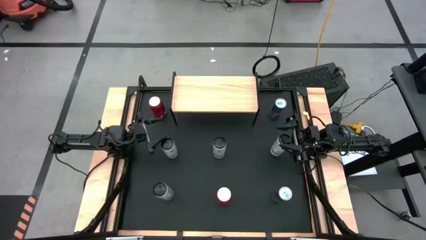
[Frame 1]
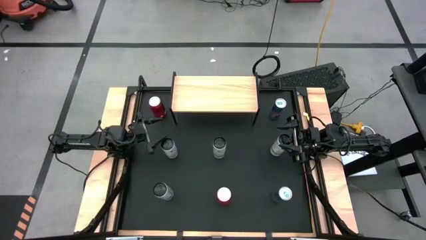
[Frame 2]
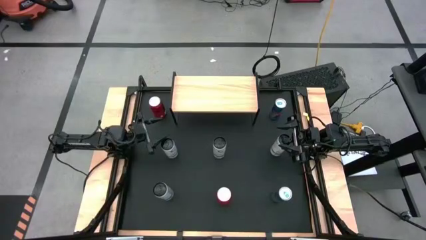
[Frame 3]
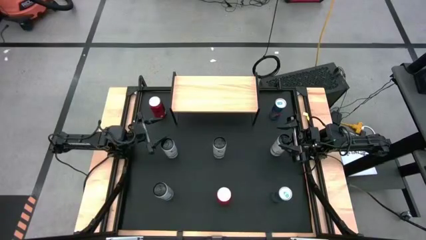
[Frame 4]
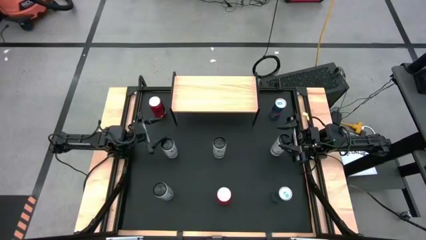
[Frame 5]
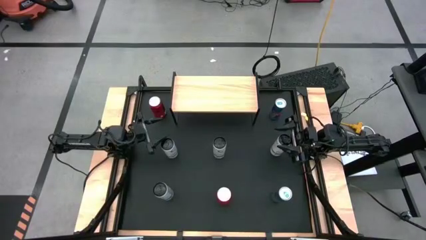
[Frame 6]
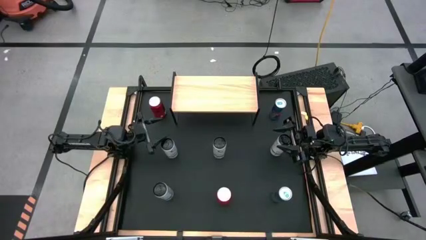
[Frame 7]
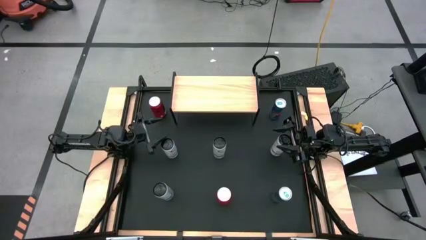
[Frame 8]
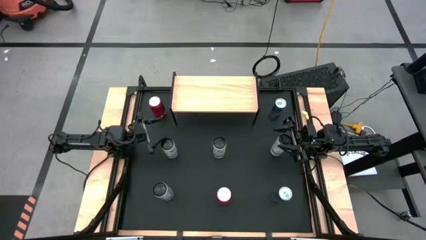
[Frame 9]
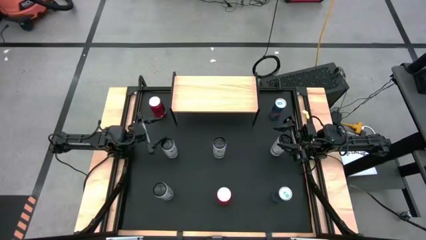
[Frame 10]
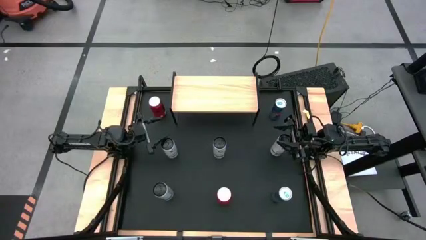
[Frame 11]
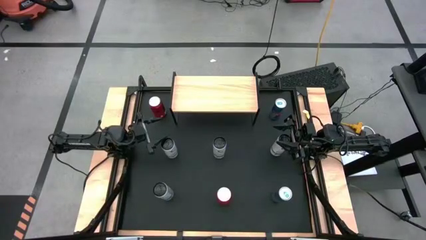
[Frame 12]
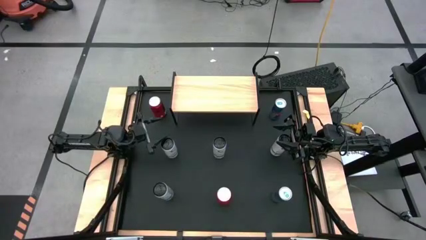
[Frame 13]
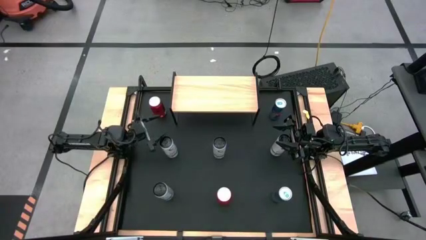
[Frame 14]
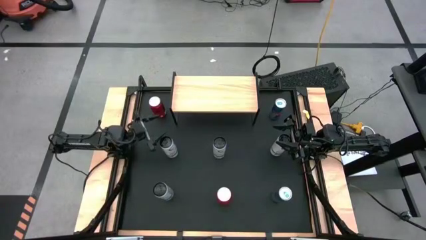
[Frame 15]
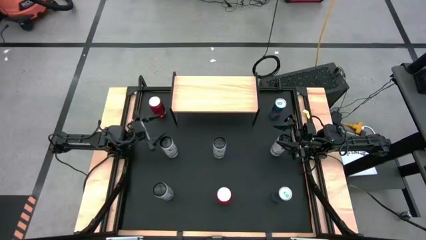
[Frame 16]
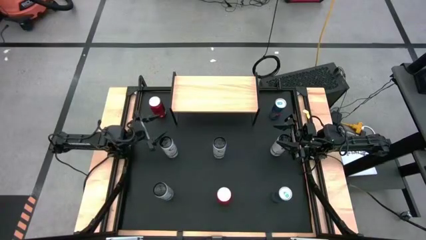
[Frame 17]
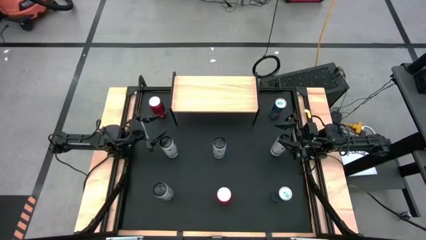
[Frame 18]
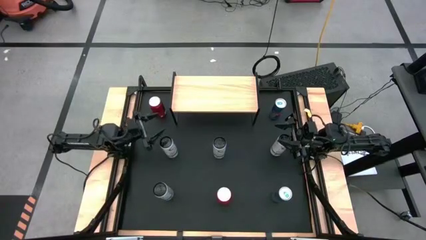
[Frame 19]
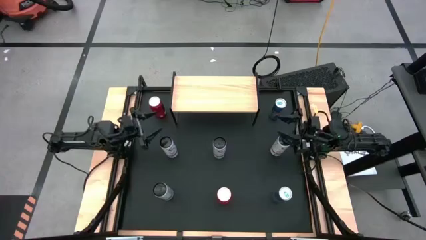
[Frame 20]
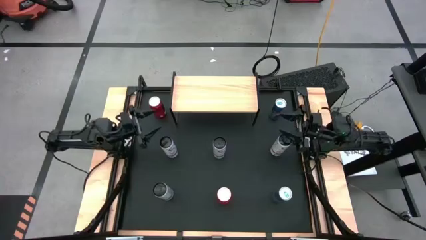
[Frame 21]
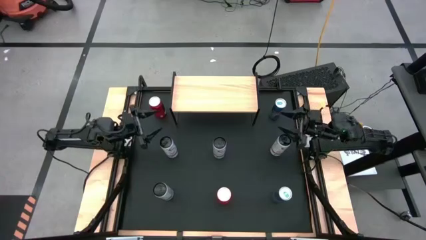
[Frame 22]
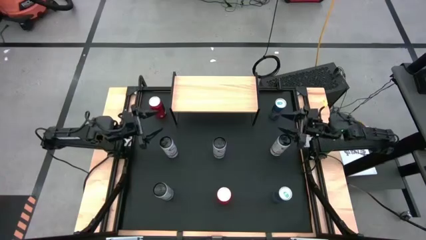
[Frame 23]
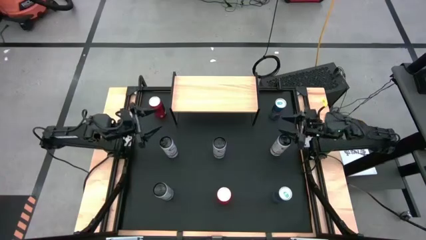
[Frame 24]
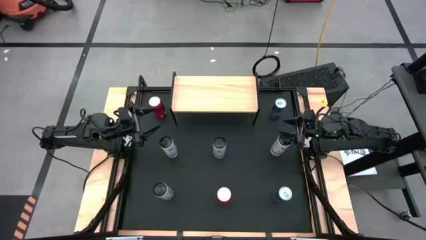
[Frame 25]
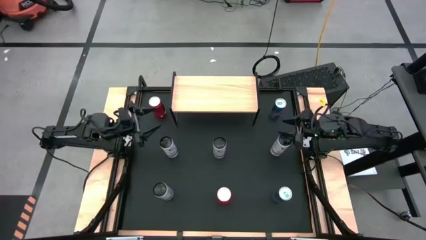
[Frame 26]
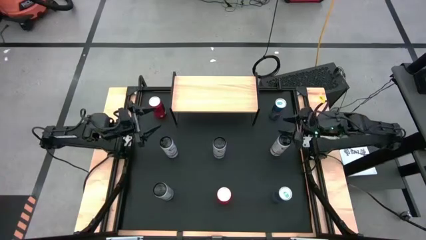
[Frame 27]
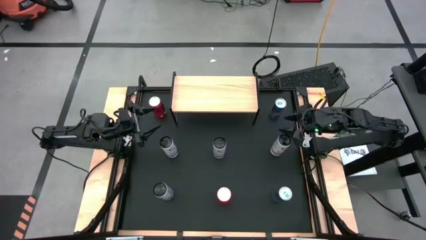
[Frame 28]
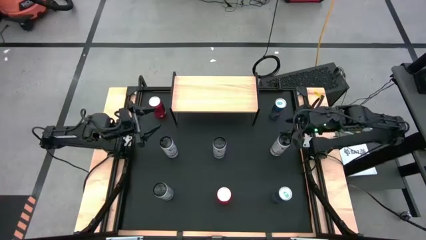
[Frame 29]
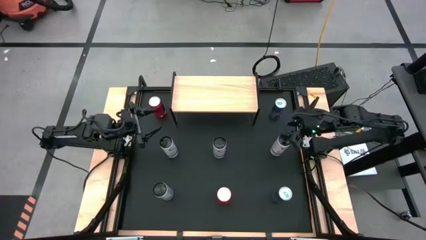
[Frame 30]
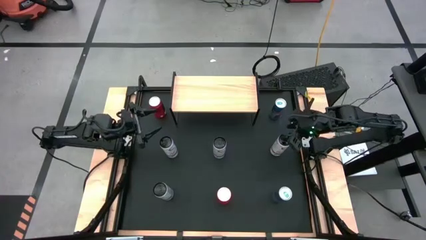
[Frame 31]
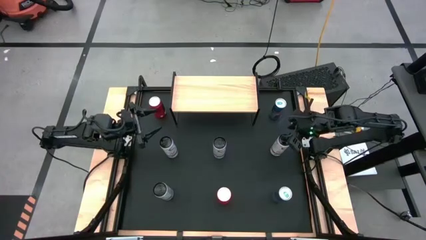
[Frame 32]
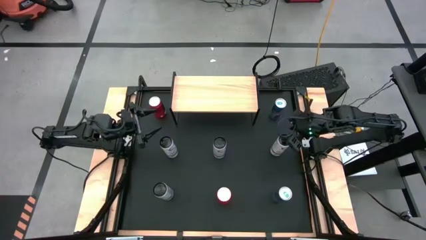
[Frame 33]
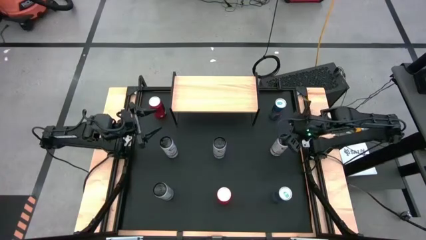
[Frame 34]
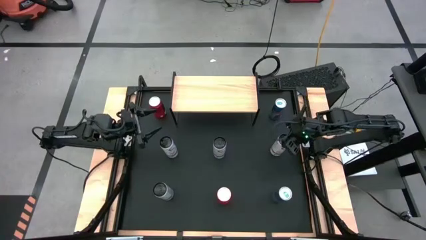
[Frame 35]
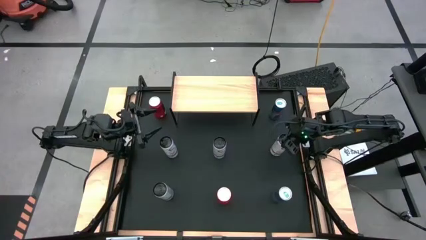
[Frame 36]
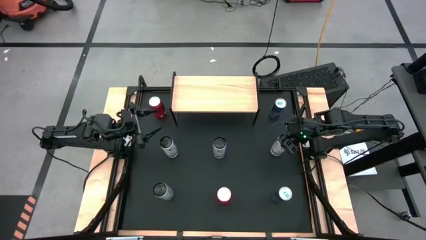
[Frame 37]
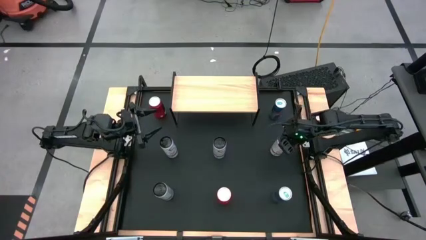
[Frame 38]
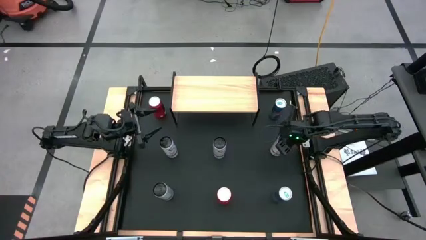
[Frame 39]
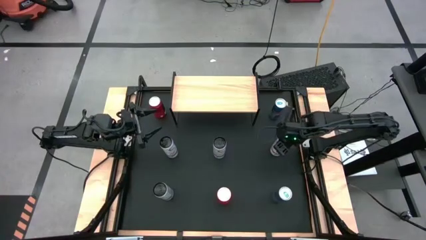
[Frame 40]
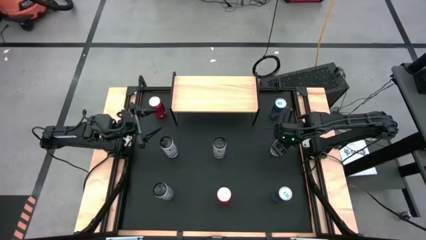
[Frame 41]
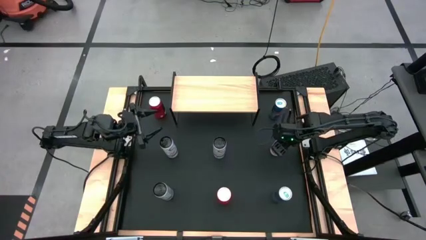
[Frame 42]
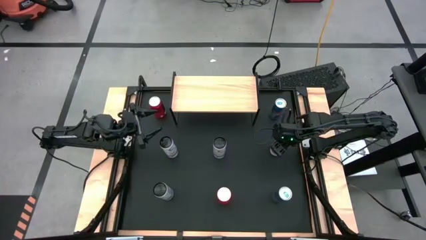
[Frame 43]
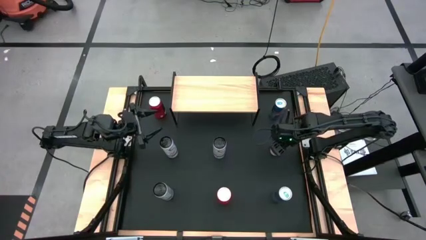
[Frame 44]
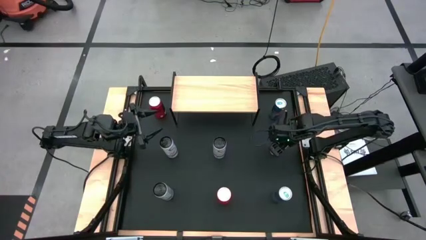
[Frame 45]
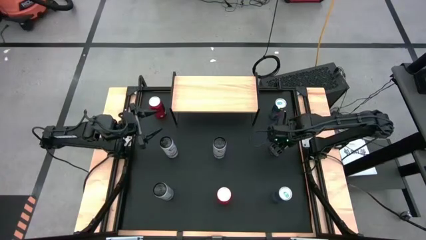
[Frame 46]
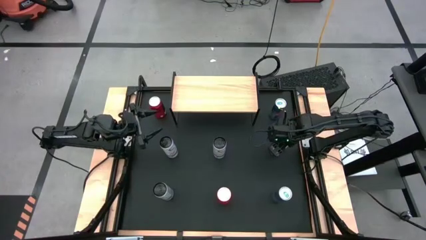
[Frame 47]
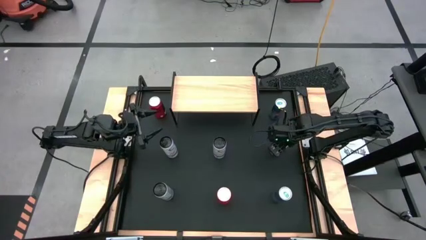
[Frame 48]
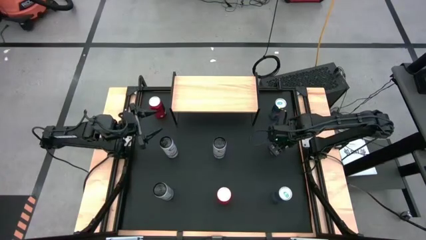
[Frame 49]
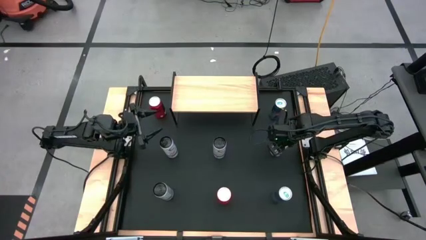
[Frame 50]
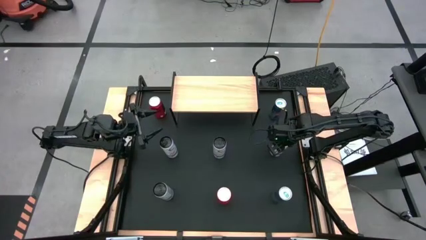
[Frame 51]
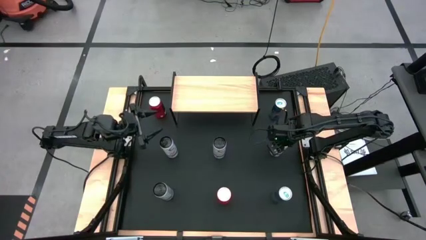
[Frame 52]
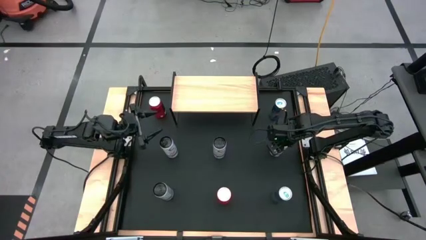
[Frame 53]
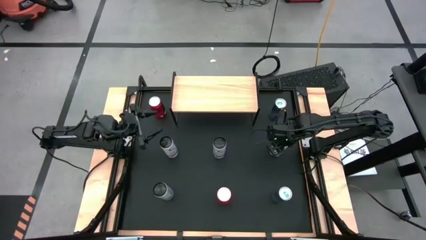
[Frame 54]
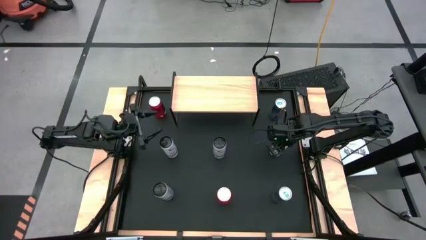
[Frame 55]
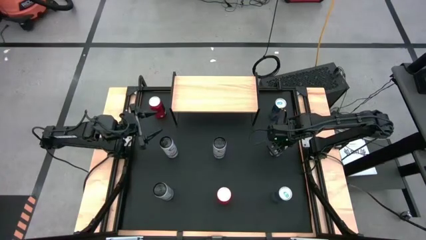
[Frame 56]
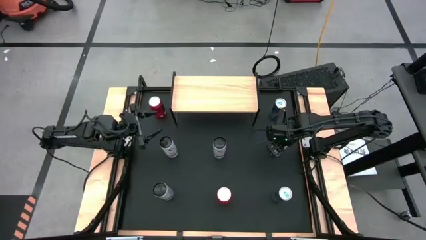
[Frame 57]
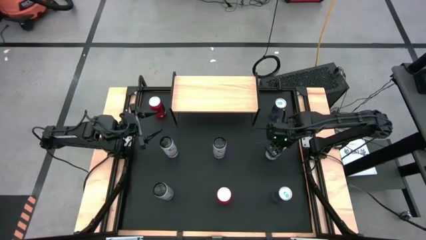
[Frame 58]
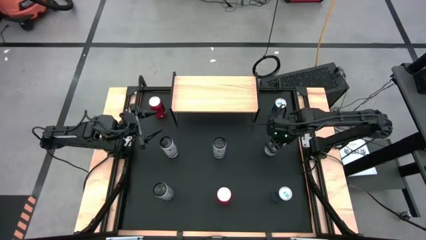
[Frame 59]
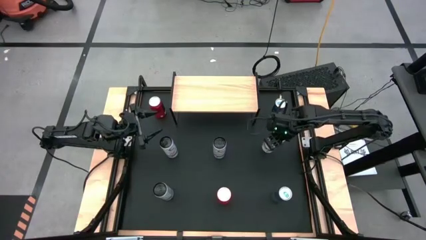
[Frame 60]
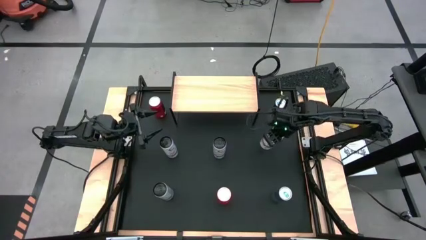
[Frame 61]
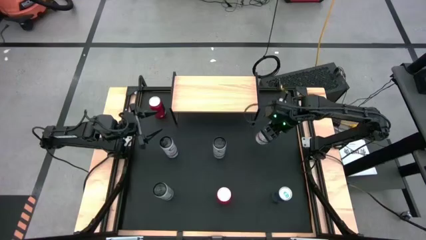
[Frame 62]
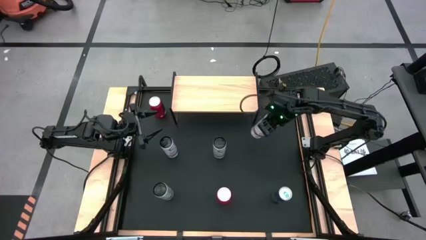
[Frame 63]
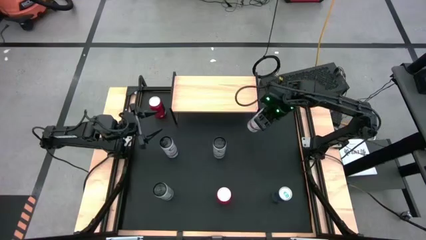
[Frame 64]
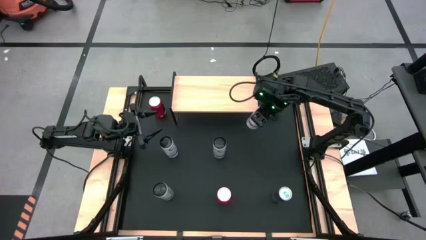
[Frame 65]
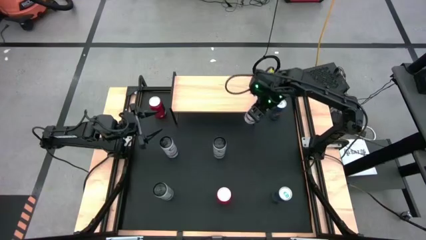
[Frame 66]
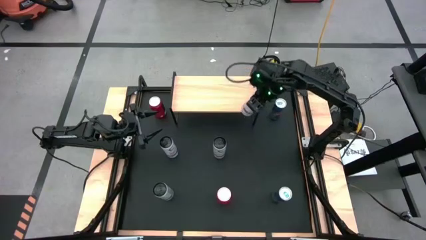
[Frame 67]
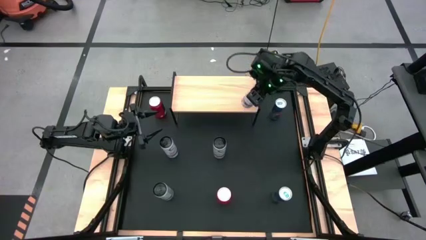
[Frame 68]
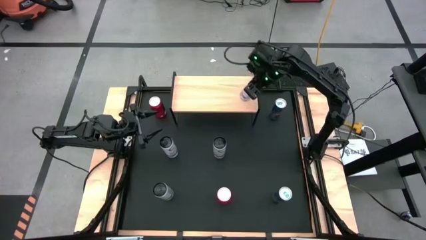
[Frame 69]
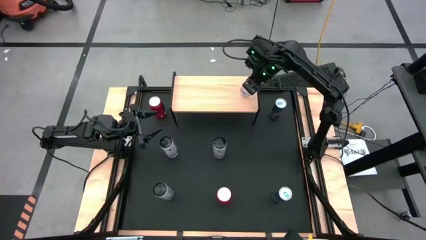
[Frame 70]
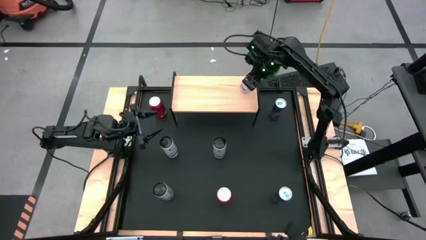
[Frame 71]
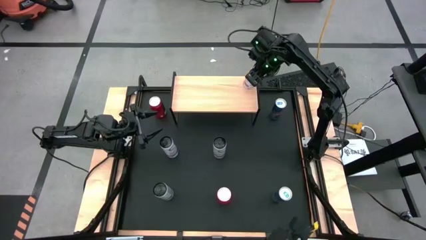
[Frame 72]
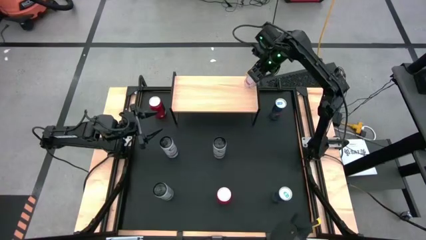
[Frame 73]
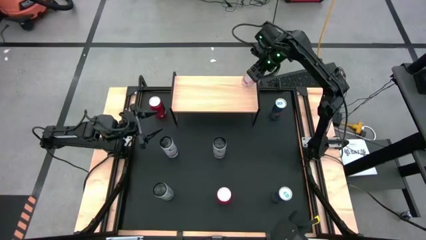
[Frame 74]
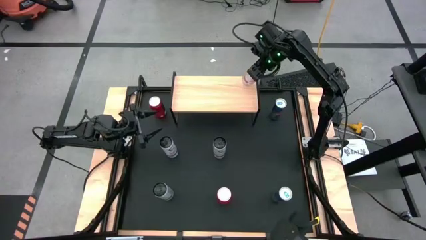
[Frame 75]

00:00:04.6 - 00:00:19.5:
Task: Place canned beverage on shelf
Put the right white pink soda can on the shelf
